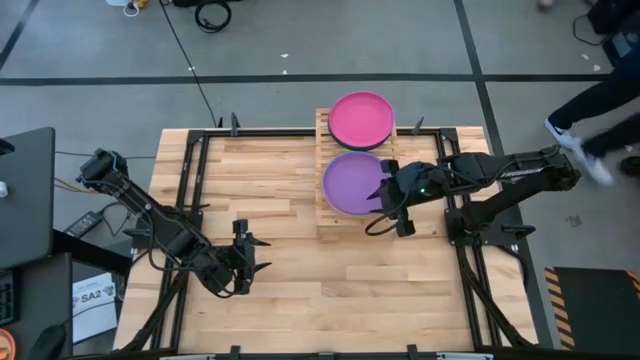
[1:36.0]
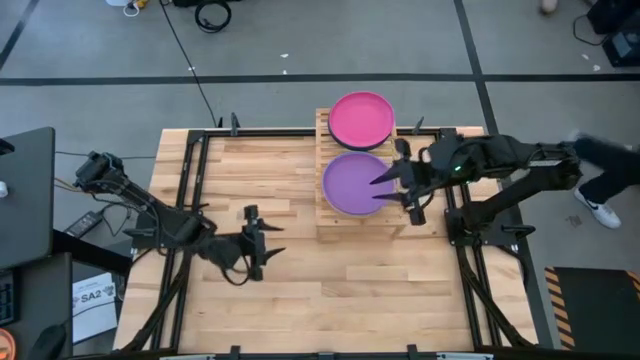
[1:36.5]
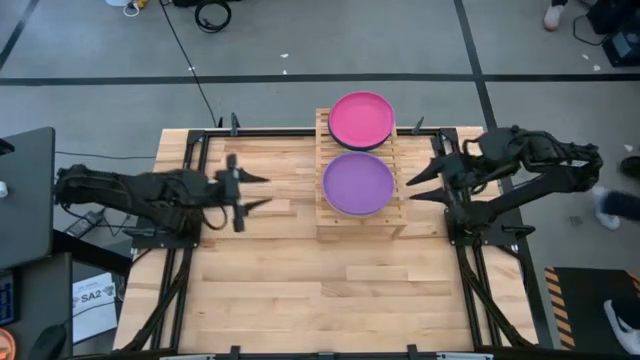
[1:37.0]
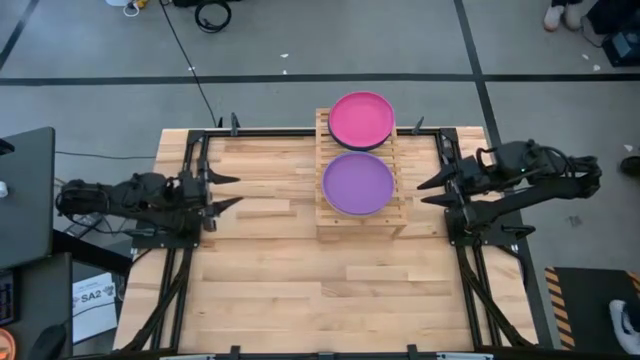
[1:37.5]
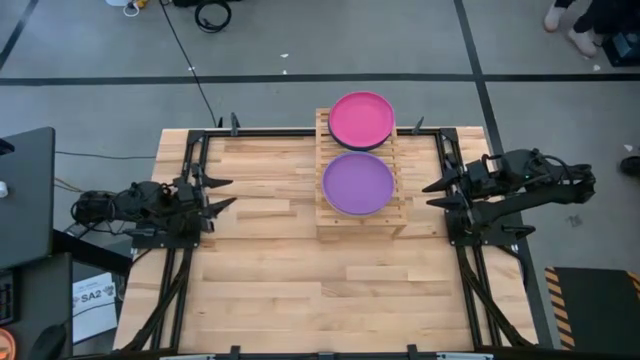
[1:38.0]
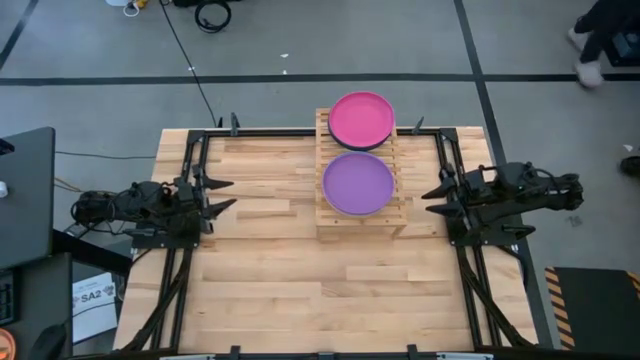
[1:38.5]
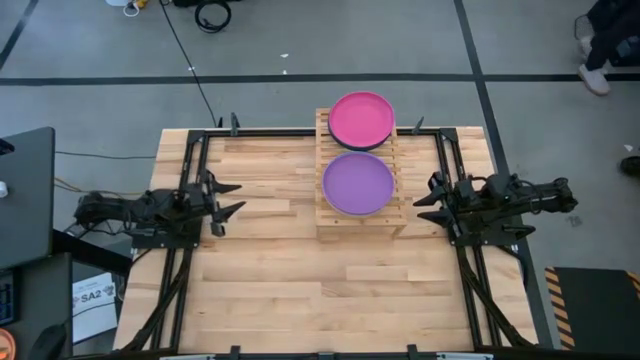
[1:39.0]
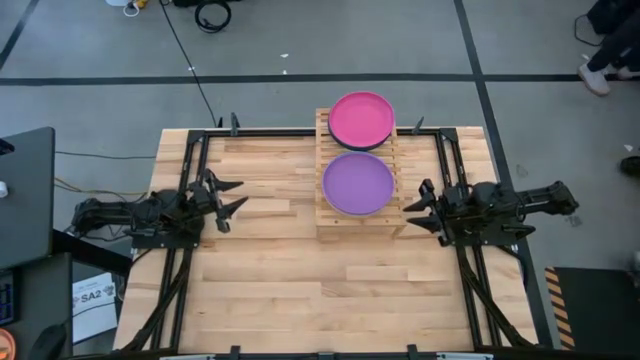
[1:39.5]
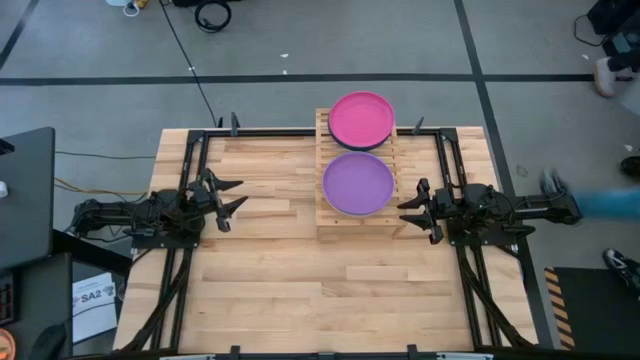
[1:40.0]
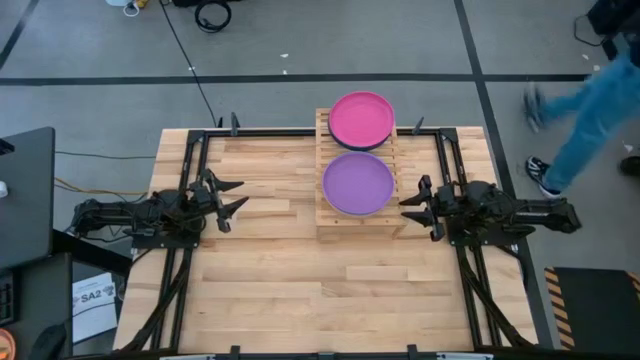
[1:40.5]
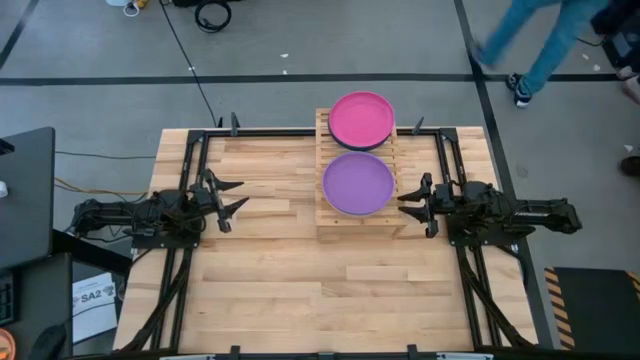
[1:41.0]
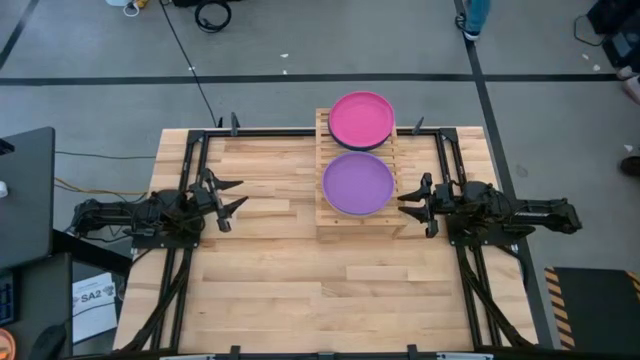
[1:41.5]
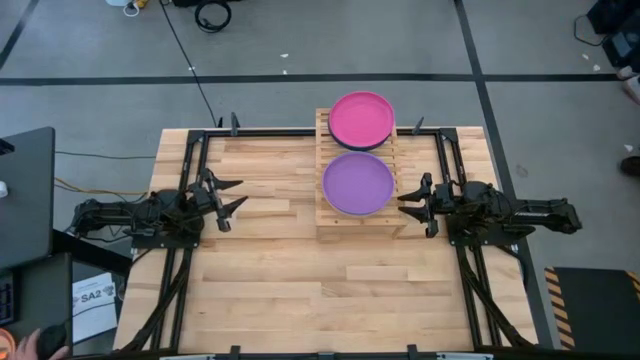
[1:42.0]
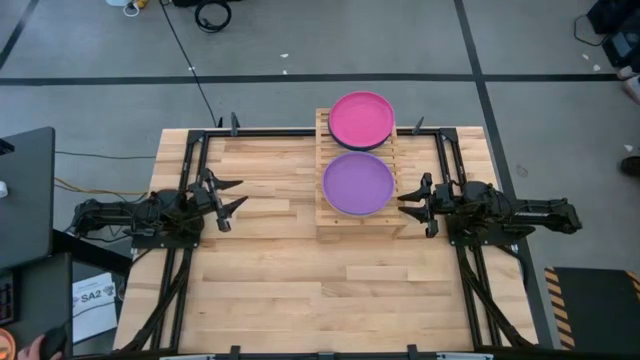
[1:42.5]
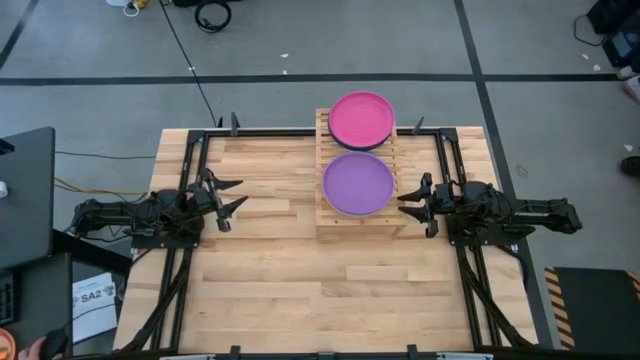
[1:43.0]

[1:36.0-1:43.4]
Task: Place and stack plates onto a shelf
Return to Home Position

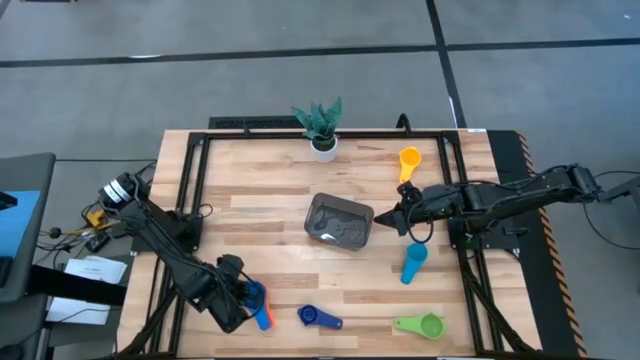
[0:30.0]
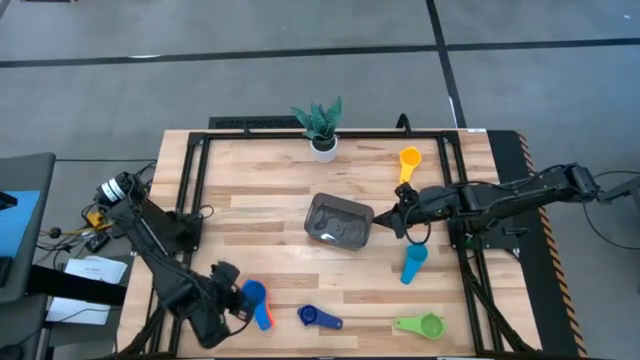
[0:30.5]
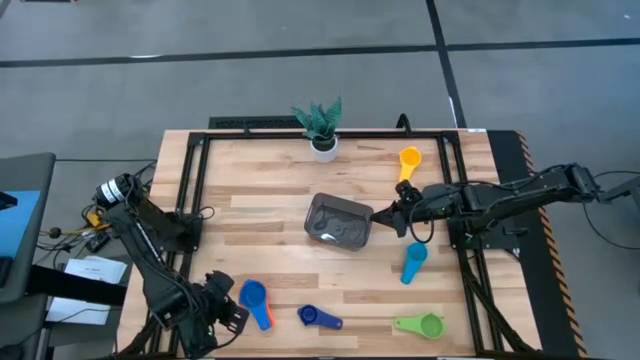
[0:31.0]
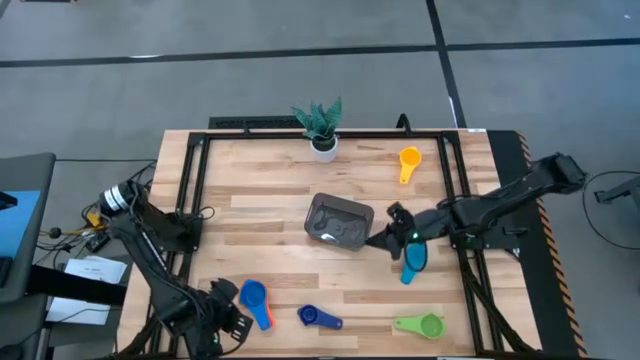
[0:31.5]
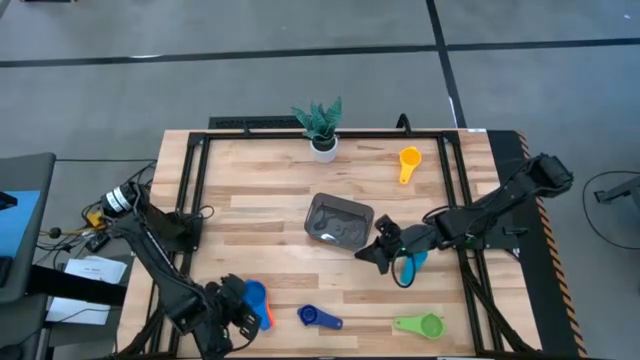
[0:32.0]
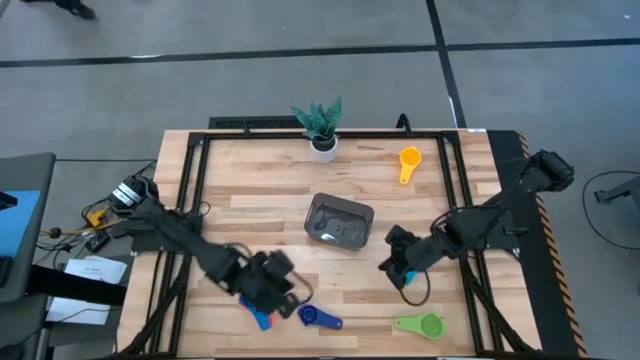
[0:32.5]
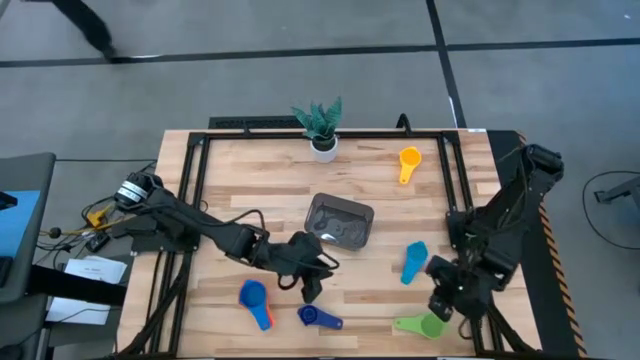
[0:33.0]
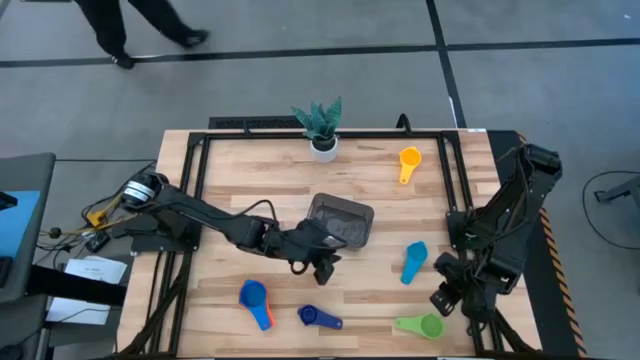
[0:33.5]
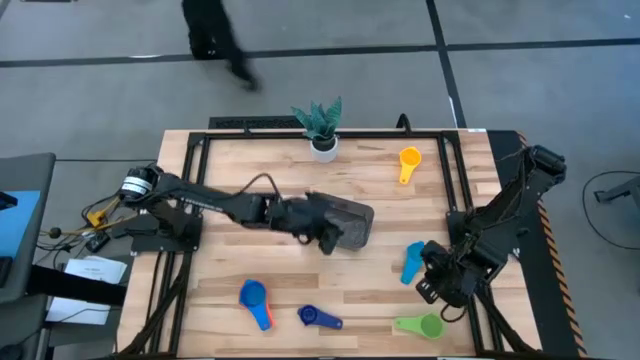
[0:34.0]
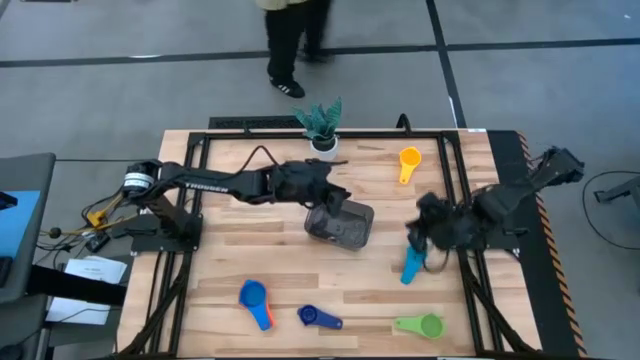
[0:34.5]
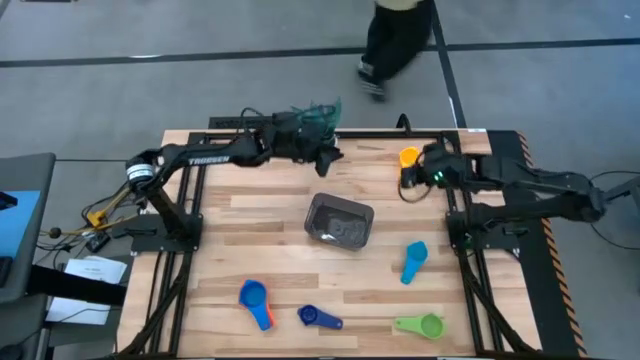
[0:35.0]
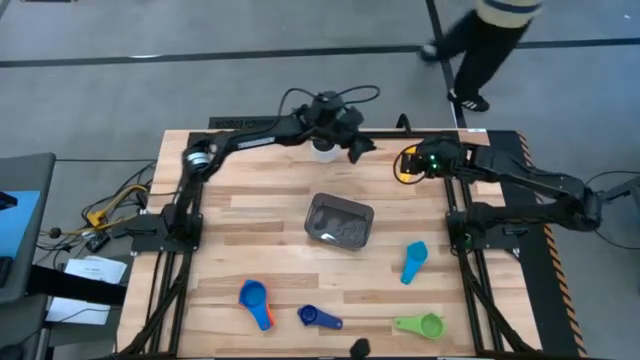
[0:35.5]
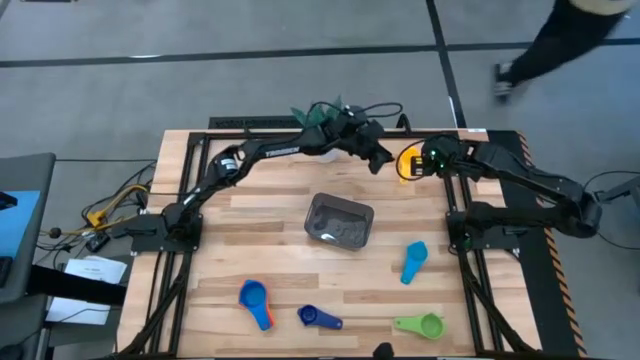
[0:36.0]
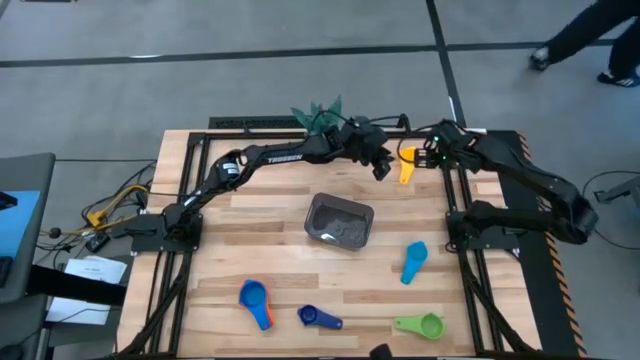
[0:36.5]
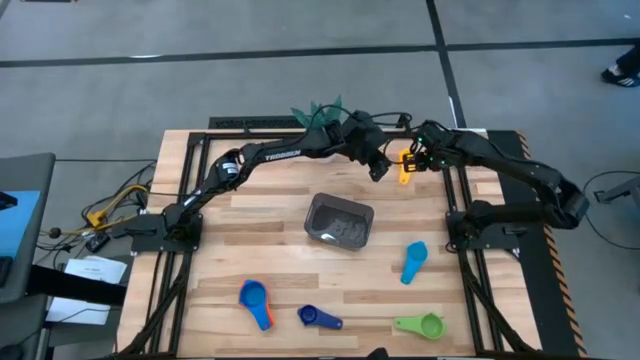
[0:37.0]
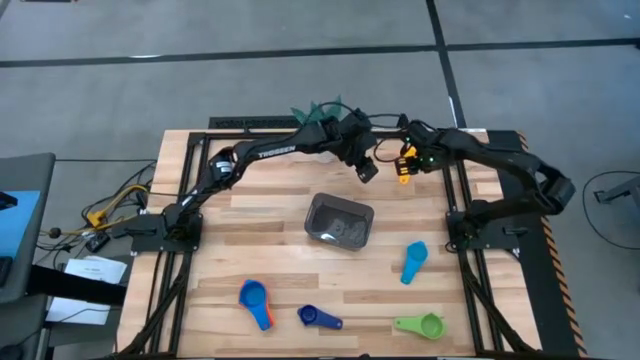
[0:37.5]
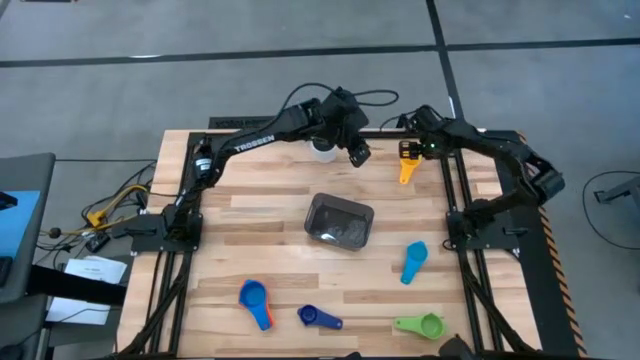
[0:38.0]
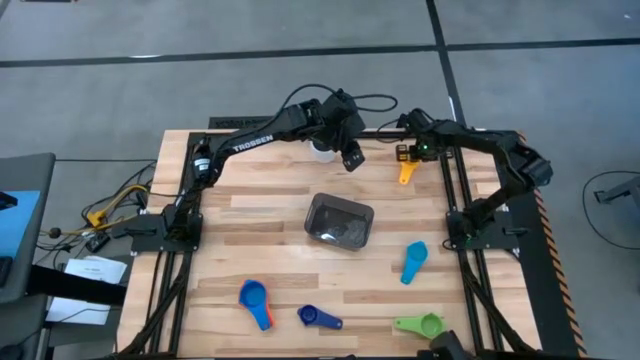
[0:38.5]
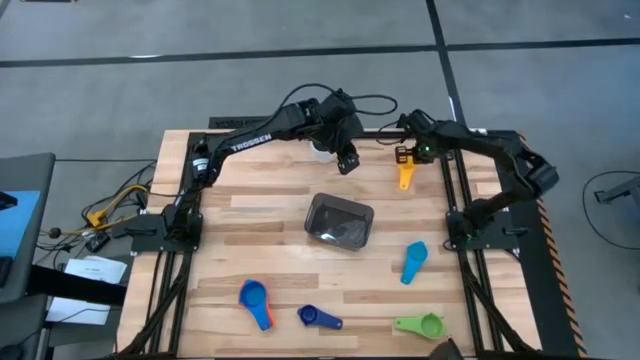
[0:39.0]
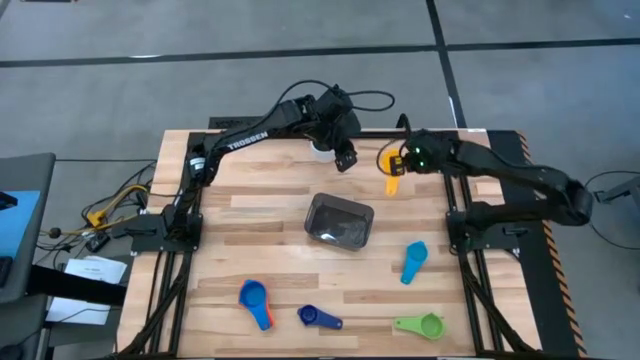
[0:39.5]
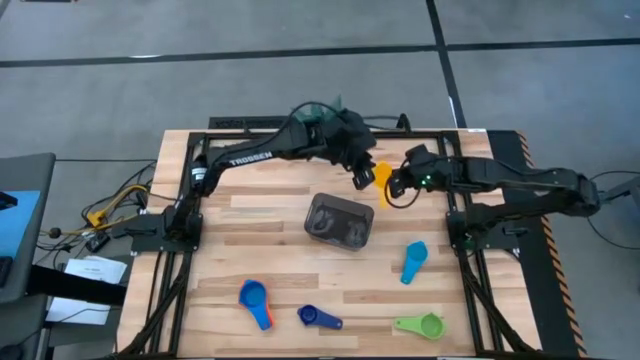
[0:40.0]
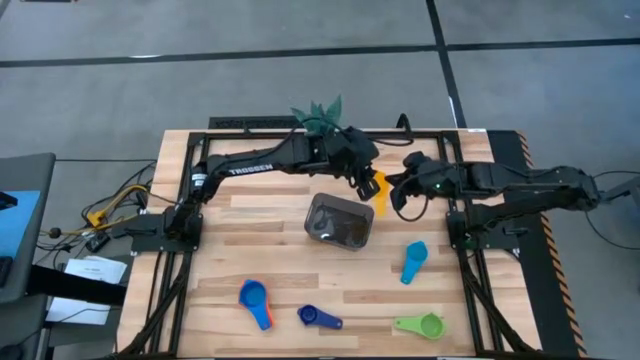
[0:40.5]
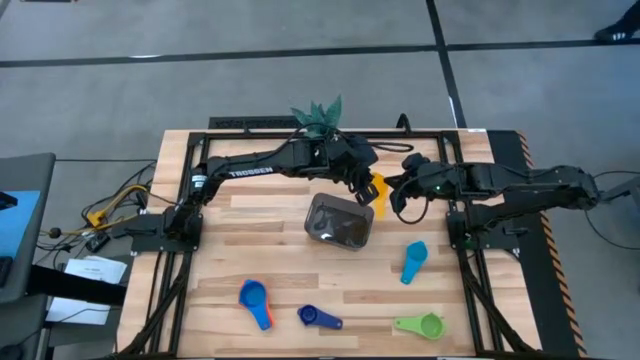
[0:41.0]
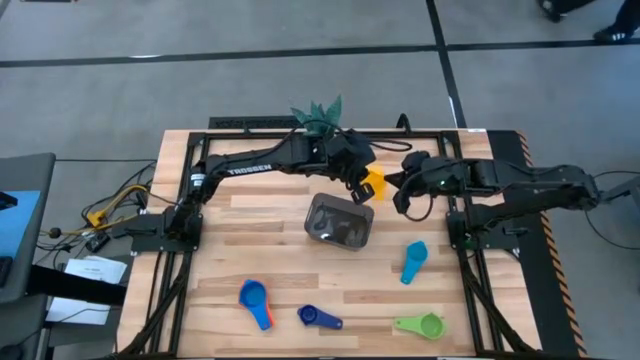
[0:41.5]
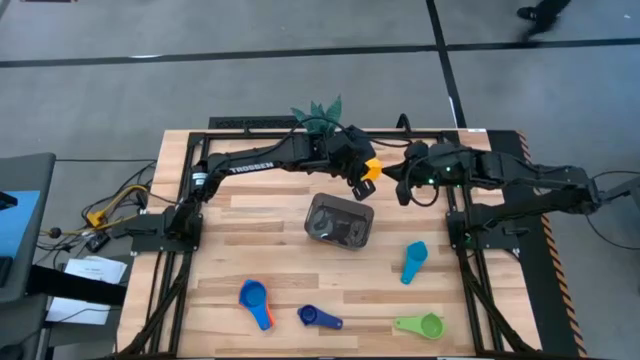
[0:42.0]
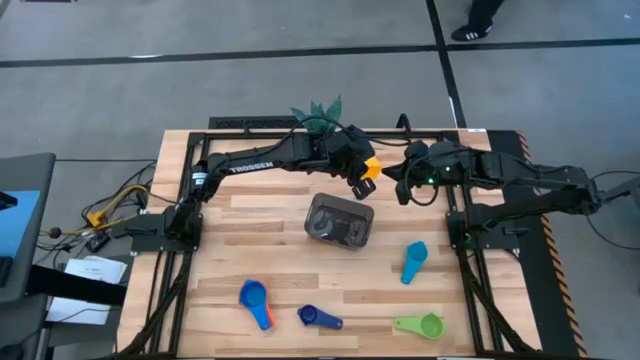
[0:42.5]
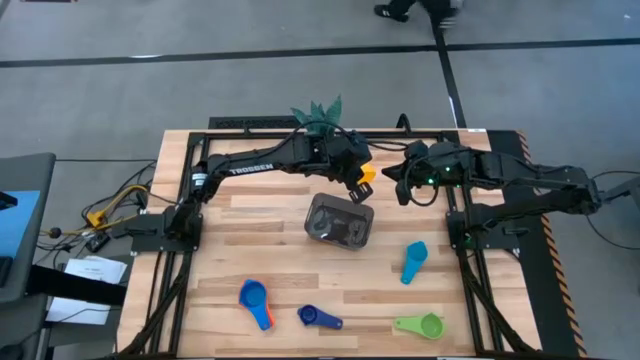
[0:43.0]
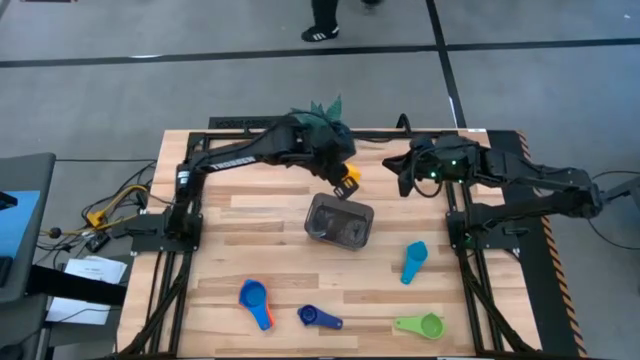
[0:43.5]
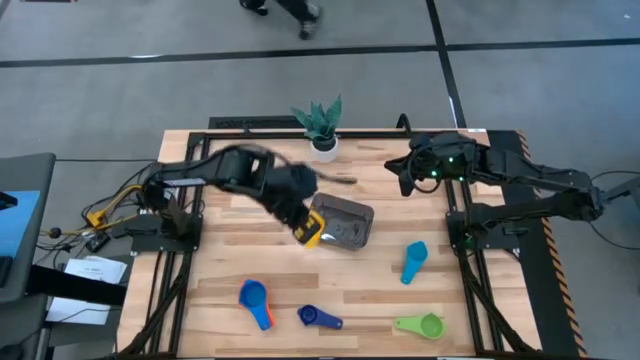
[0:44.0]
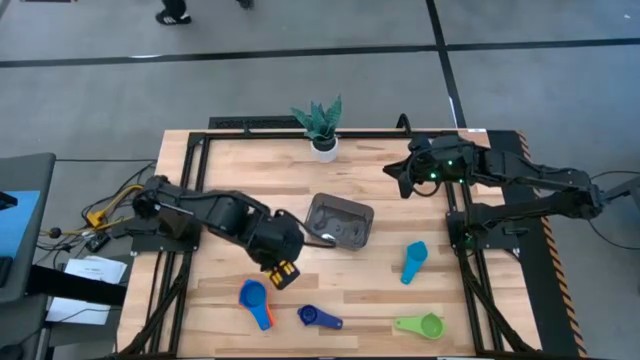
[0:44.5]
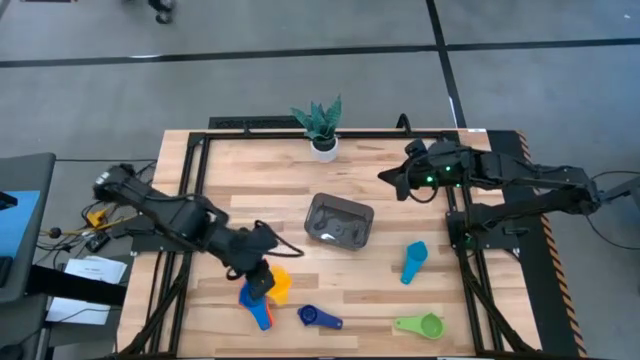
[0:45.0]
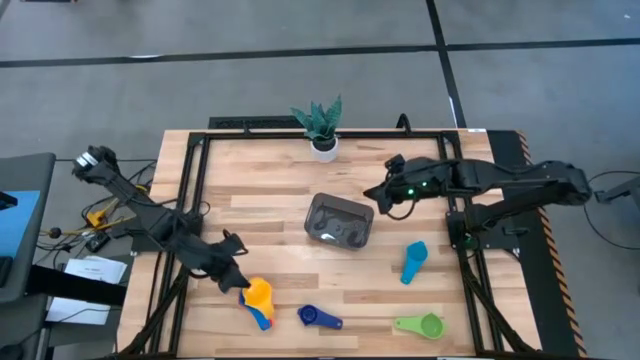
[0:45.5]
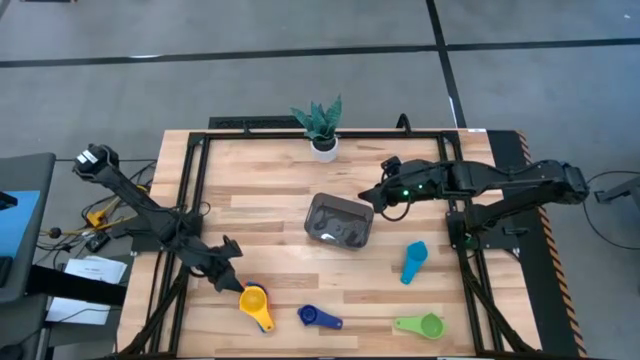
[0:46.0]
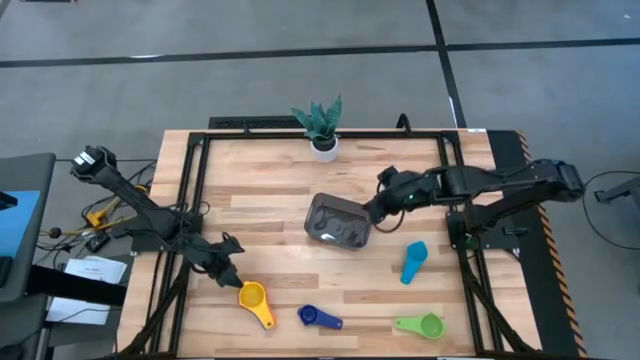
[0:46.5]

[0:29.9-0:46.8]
Task: Nest measuring cups in basket
Stack the yellow measuring cup on top of the blue measuring cup
